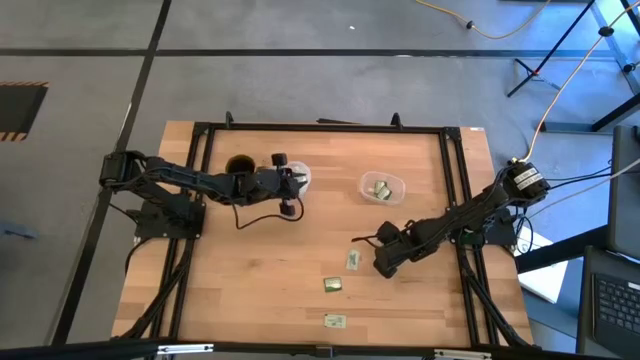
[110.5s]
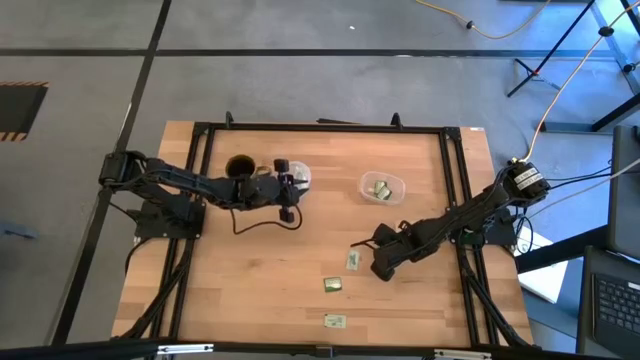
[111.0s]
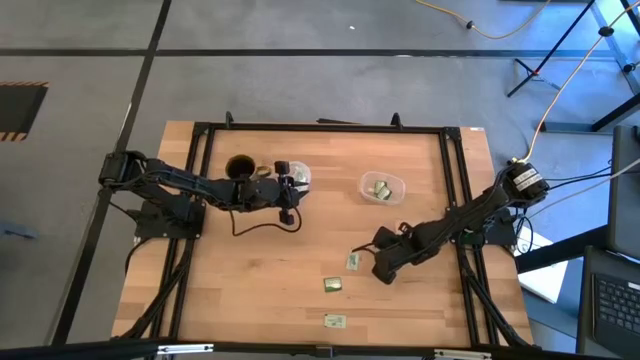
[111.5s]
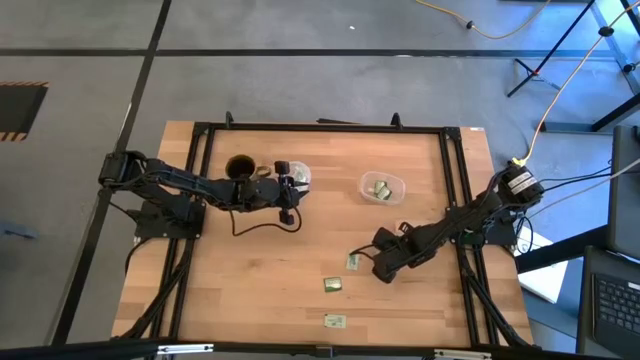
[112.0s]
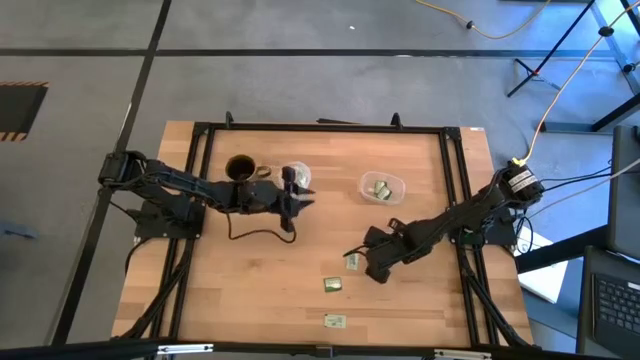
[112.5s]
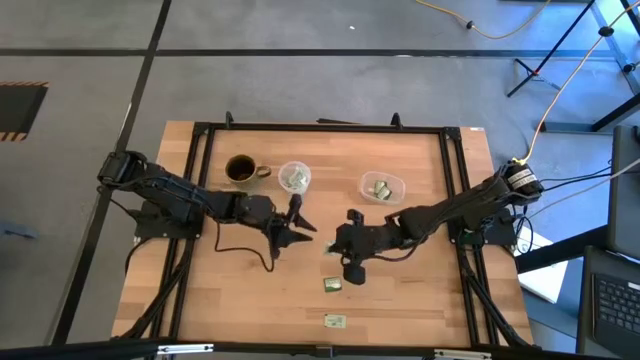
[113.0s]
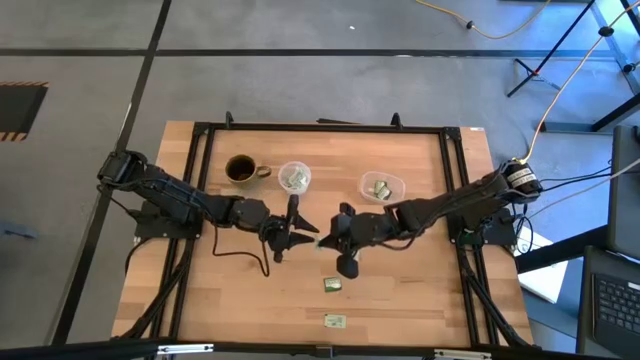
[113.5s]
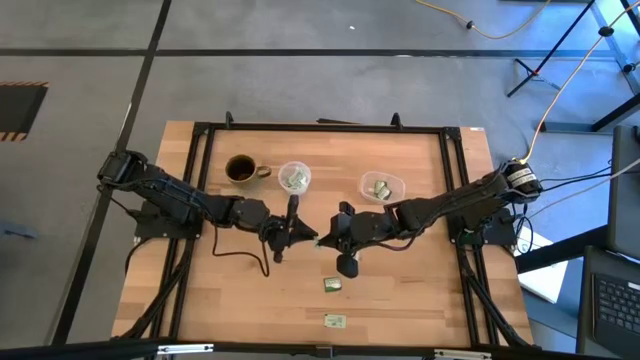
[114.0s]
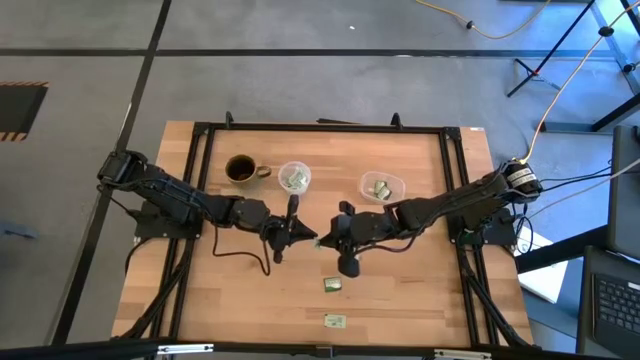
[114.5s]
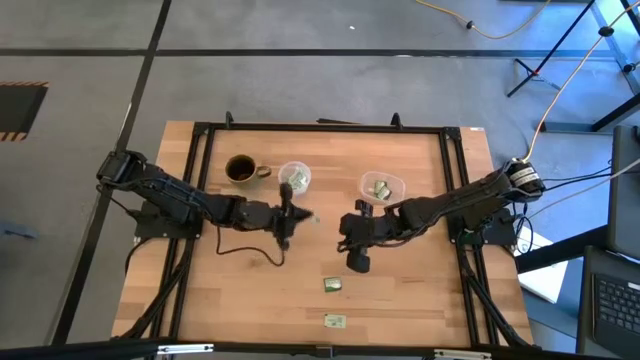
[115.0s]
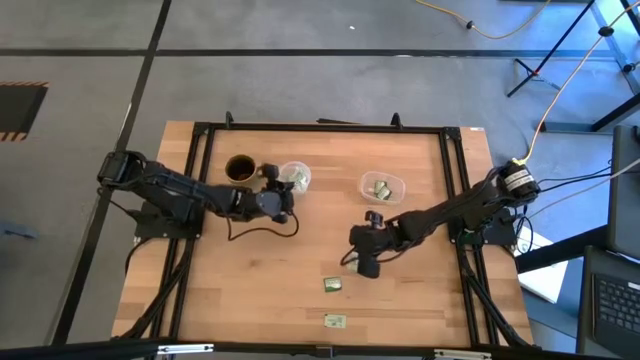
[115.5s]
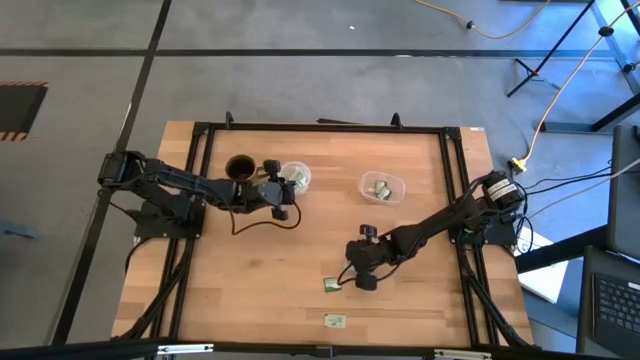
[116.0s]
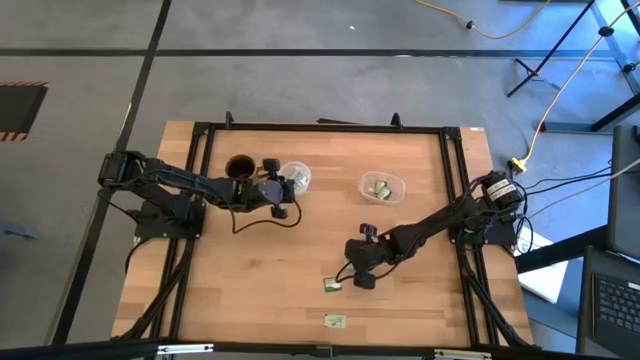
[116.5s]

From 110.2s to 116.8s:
Task: Pick and place items into bin
Put the white stevia packet into the left transparent bin

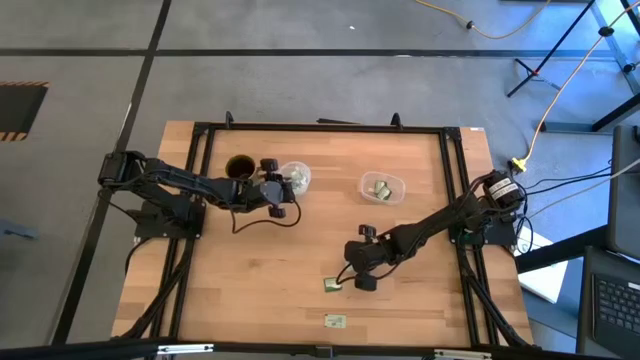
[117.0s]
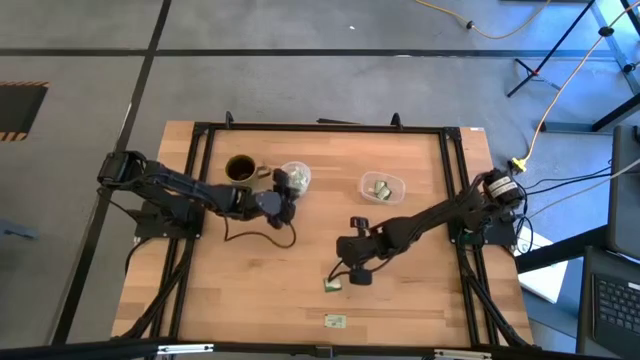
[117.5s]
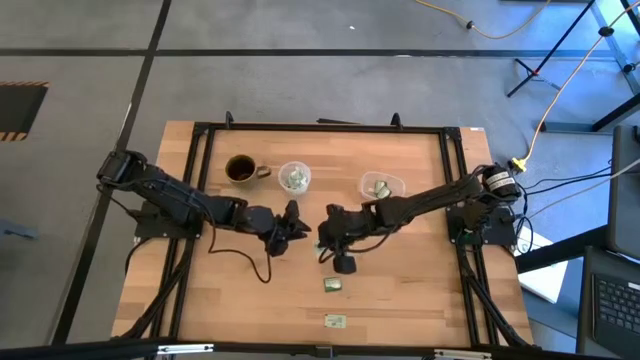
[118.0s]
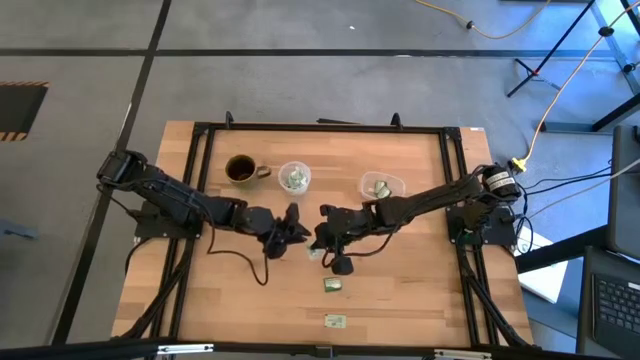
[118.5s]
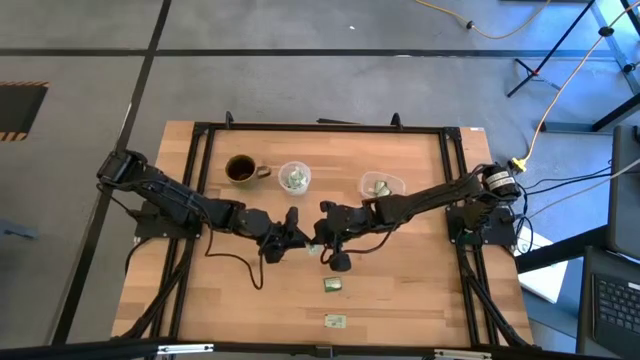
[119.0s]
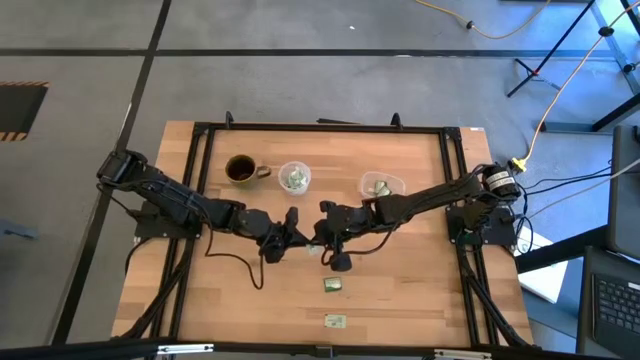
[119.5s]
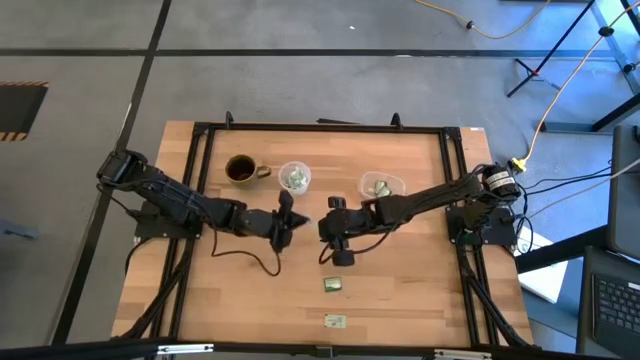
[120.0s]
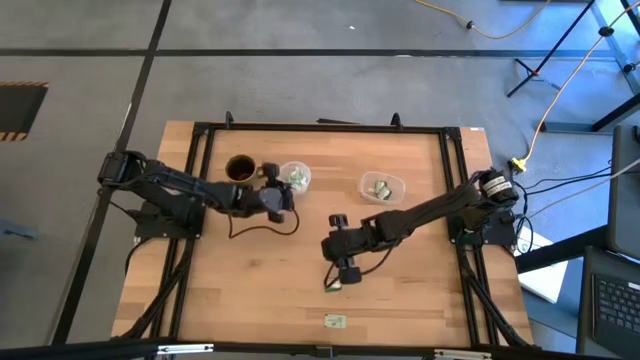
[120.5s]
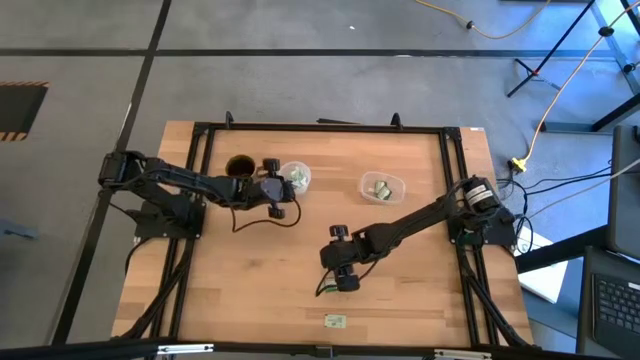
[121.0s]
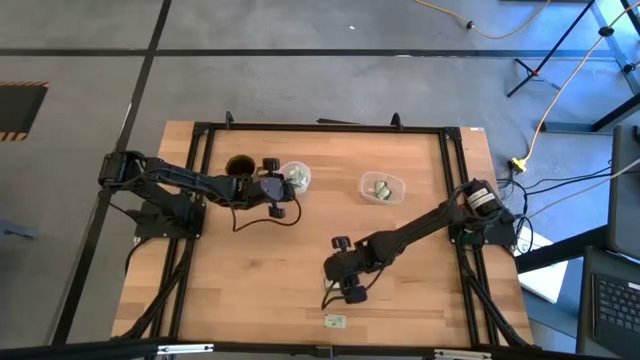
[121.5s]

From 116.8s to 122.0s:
Put the white stevia packet into the left transparent bin

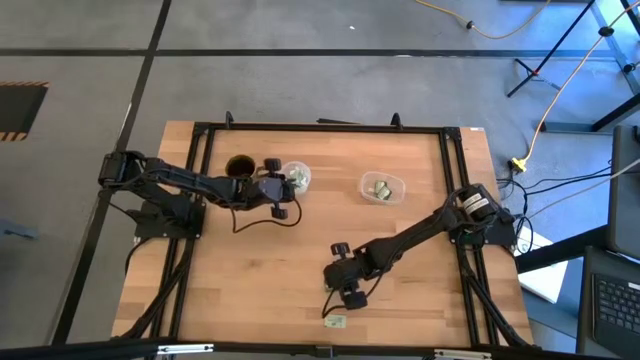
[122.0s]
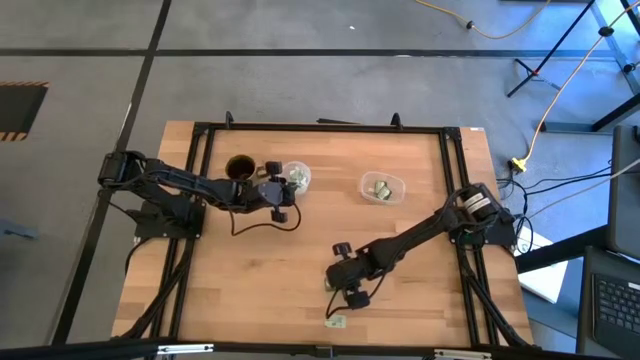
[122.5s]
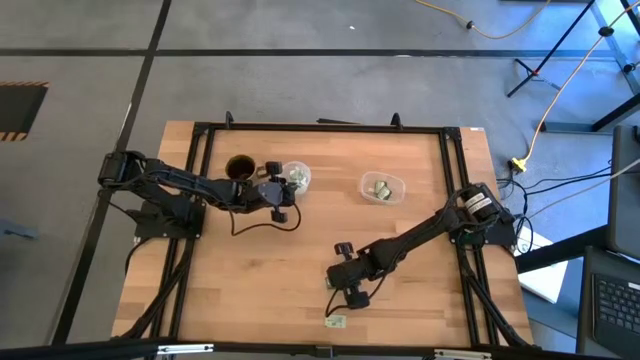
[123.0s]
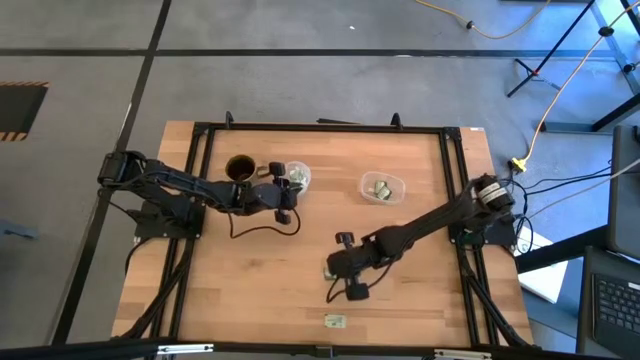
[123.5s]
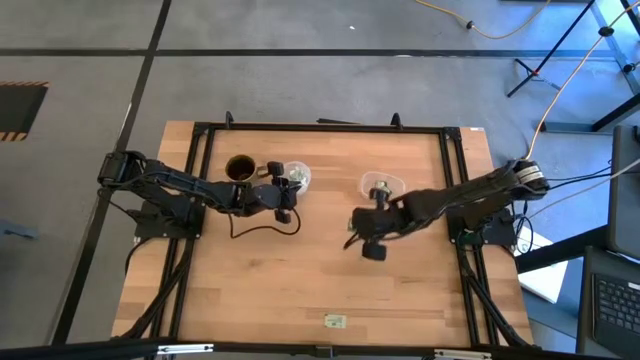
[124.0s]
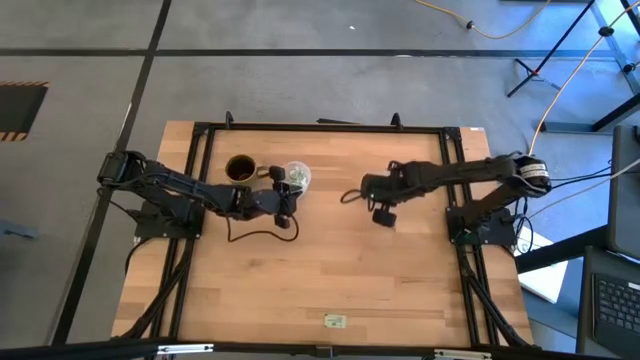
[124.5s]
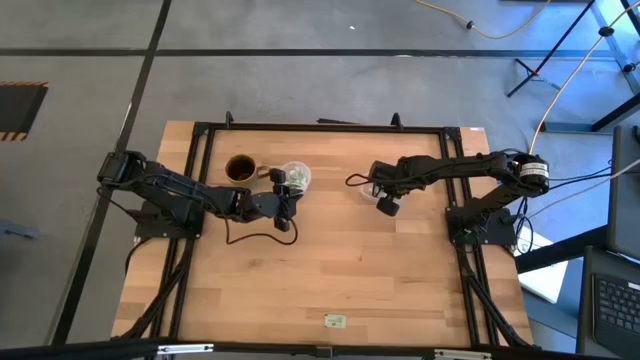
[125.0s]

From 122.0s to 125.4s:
Put the green stevia packet into the left transparent bin

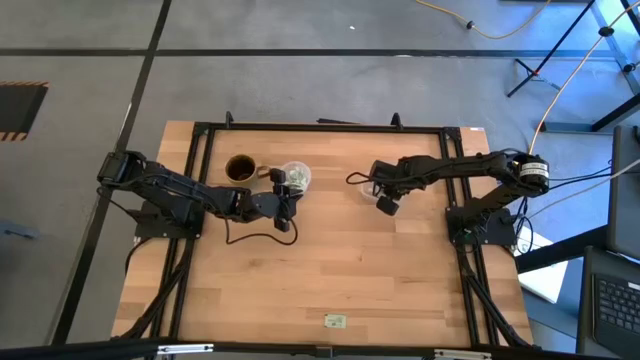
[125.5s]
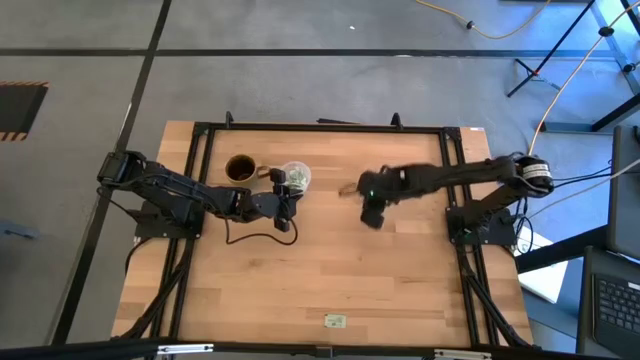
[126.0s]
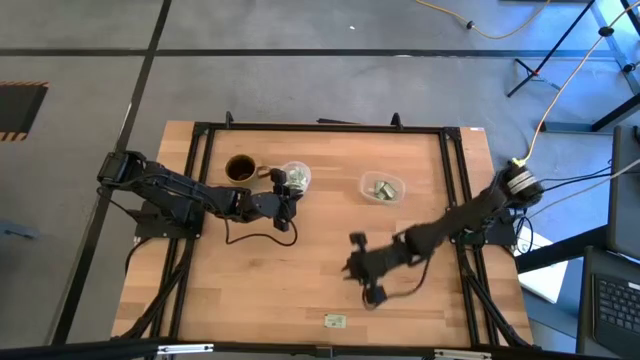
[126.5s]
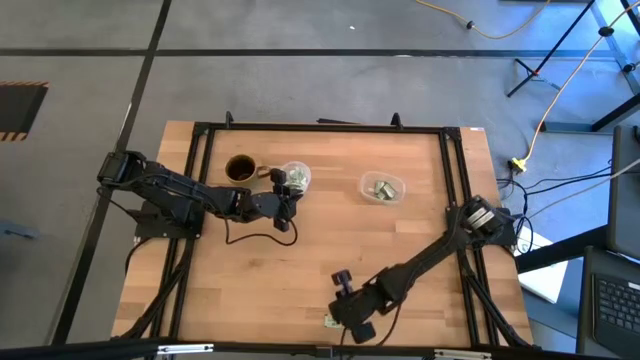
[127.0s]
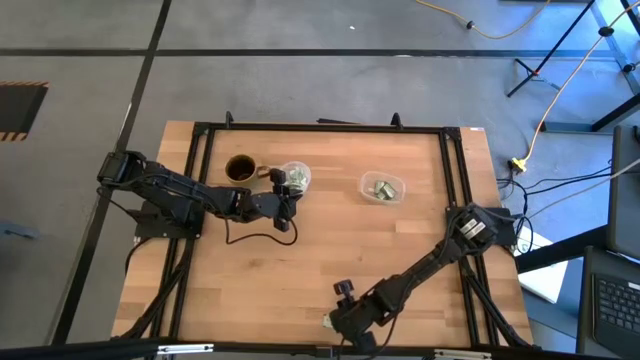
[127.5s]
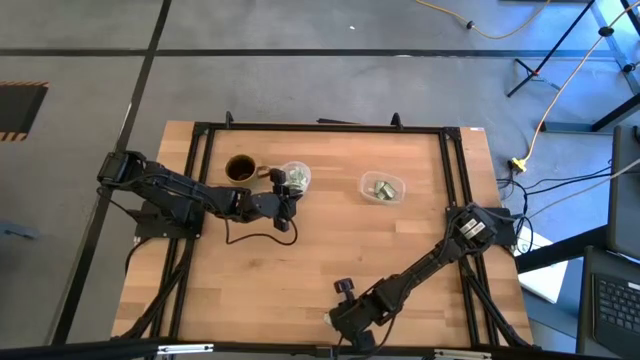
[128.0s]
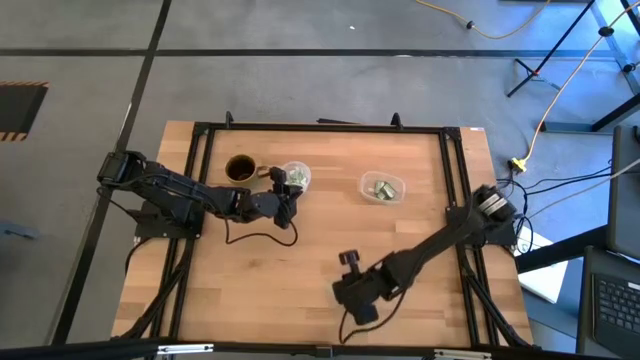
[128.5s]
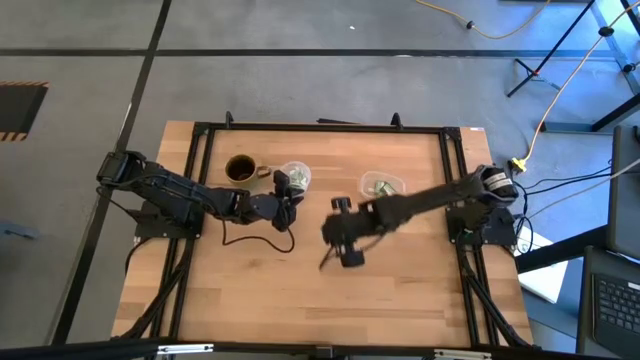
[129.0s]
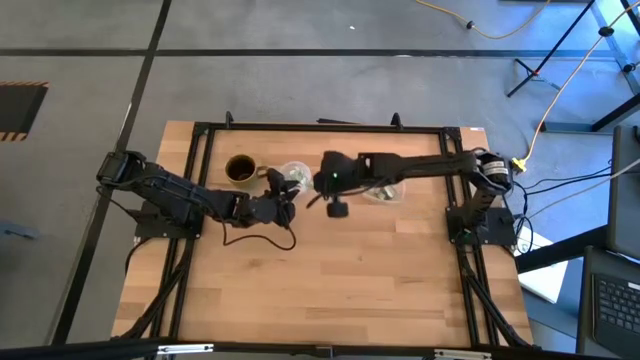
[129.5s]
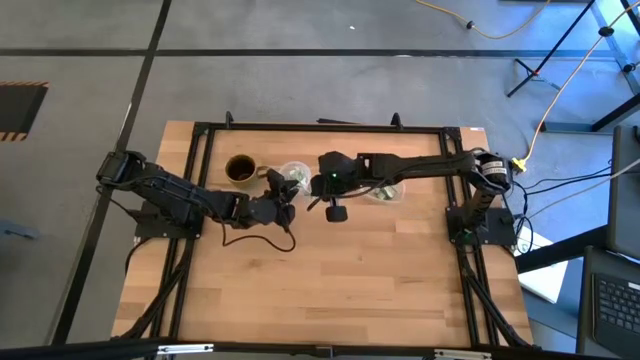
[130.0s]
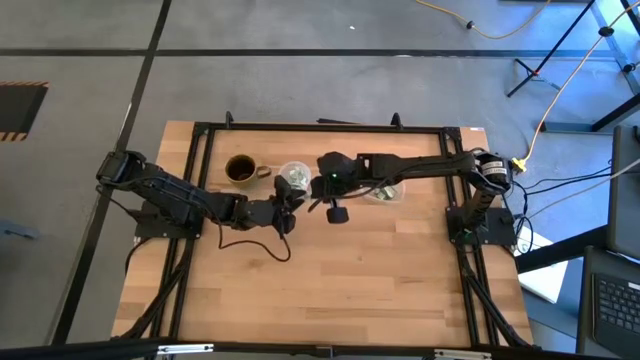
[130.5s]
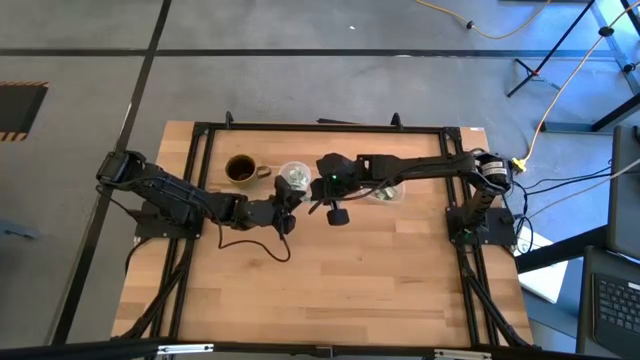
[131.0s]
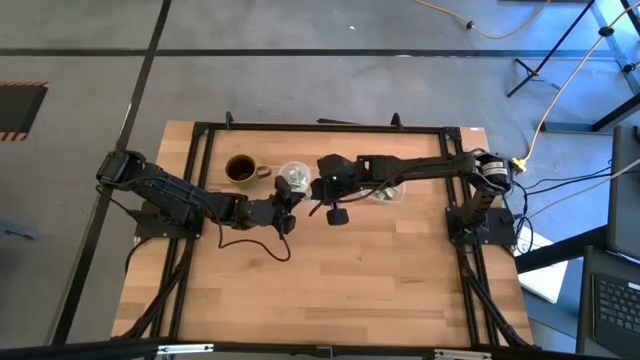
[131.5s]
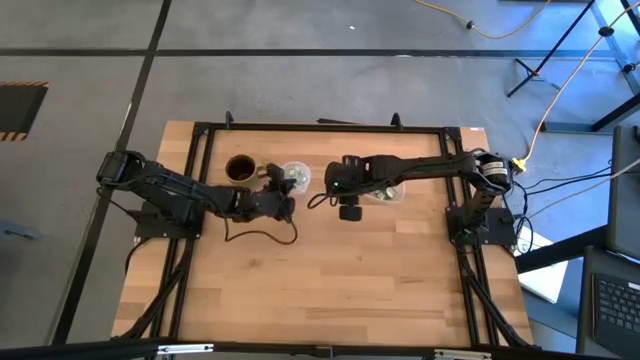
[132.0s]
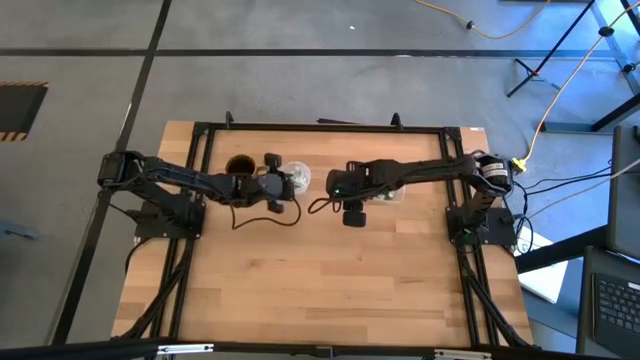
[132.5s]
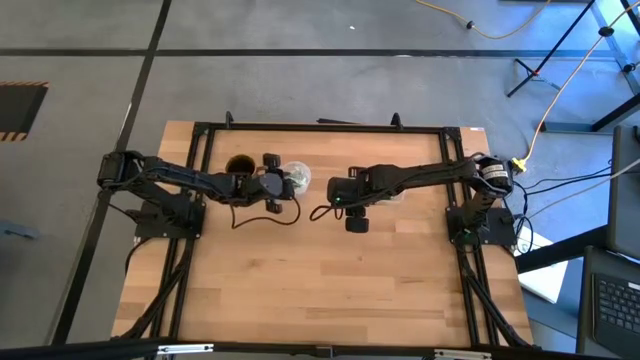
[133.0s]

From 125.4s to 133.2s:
Put the white stevia packet into the left transparent bin
